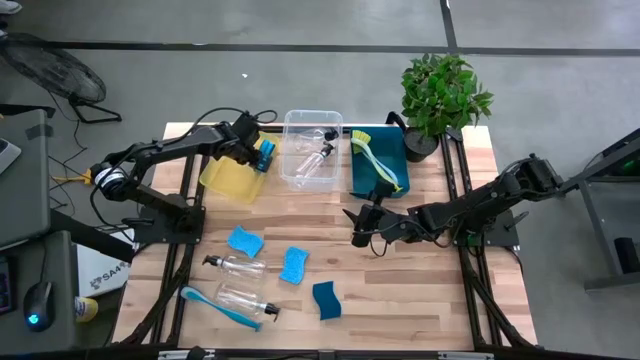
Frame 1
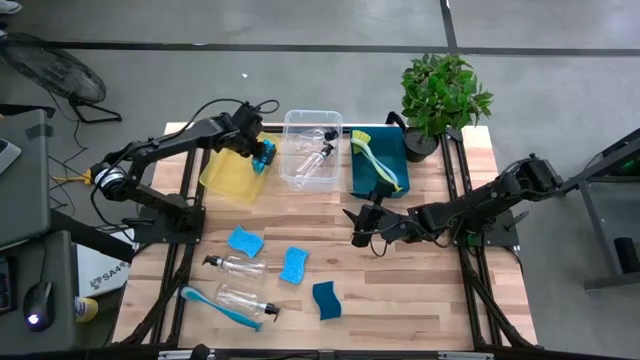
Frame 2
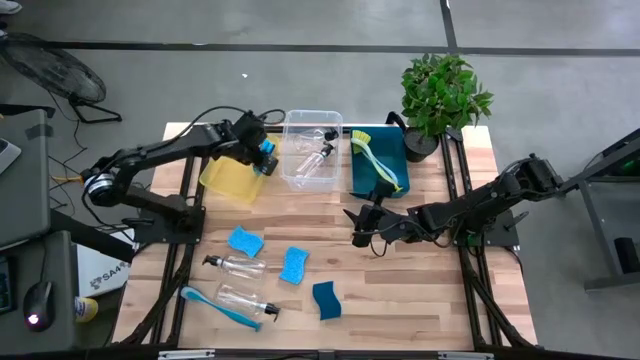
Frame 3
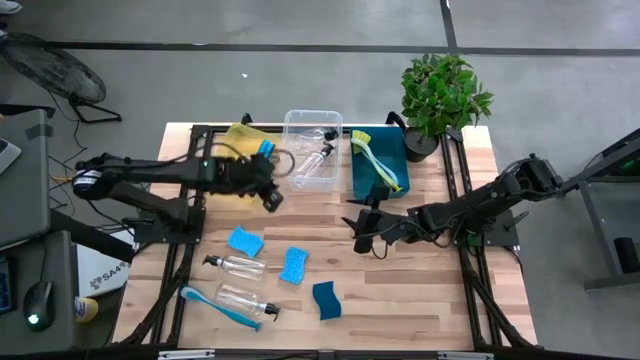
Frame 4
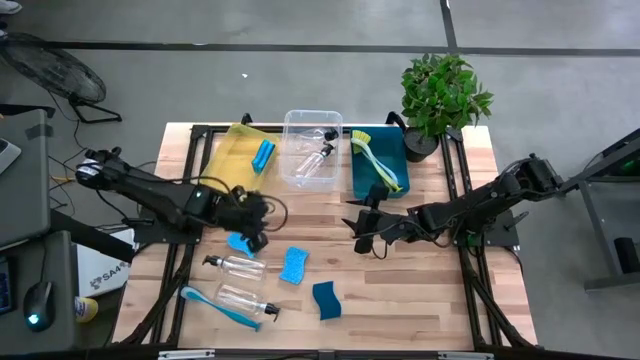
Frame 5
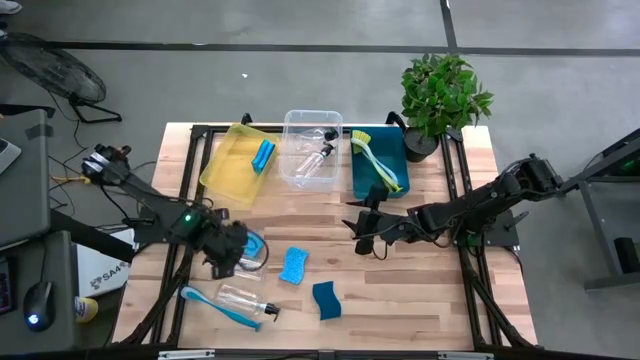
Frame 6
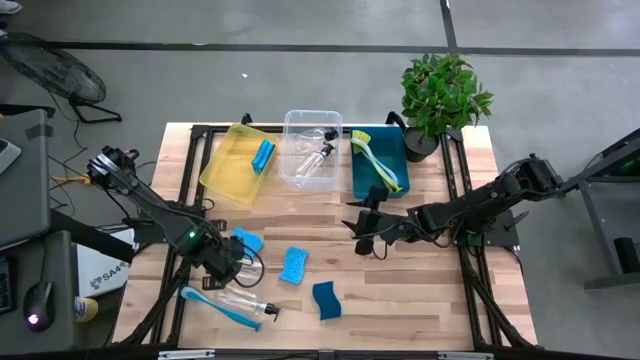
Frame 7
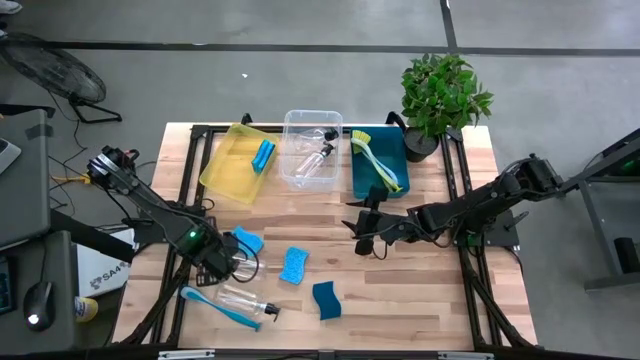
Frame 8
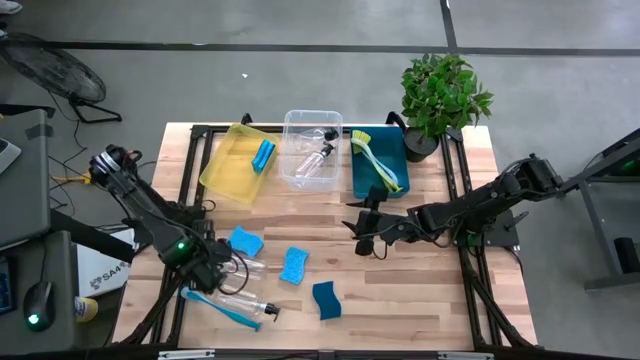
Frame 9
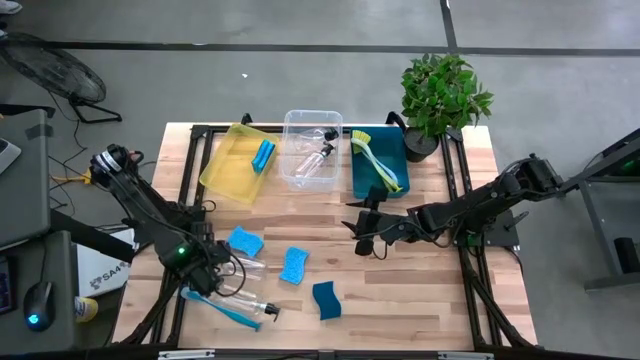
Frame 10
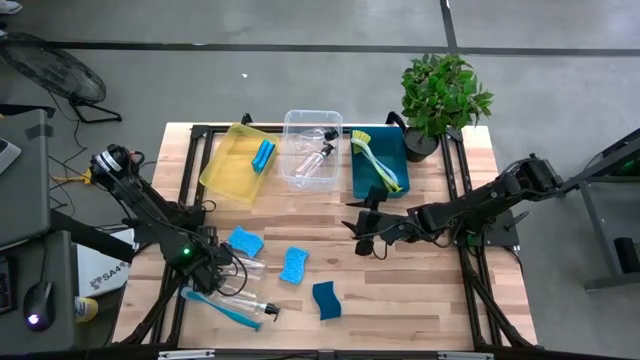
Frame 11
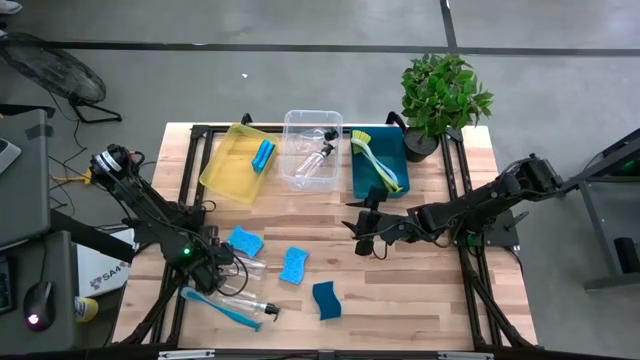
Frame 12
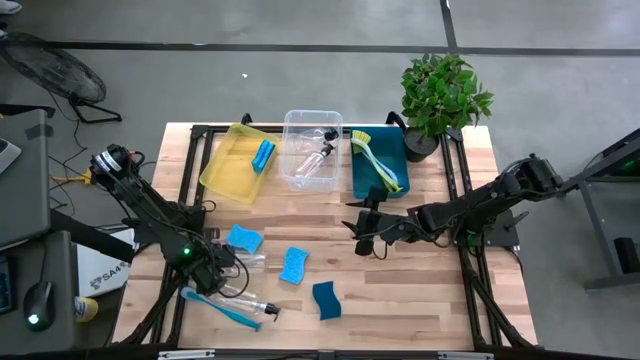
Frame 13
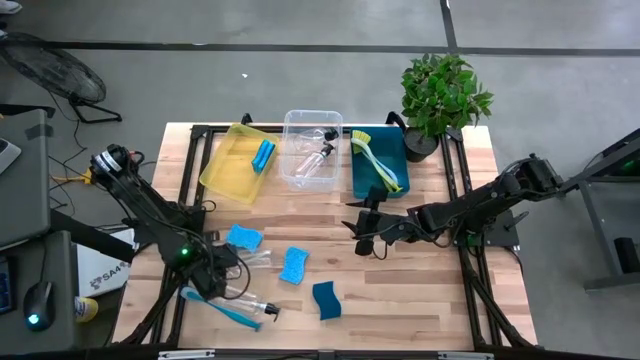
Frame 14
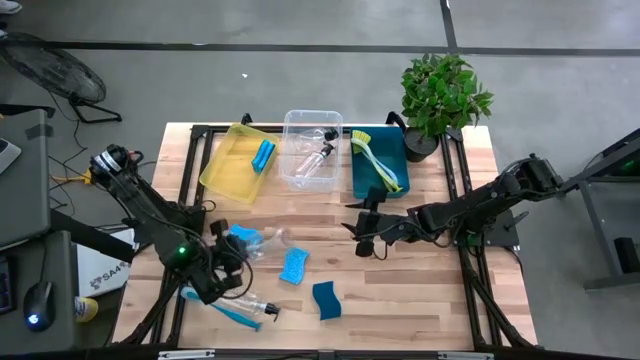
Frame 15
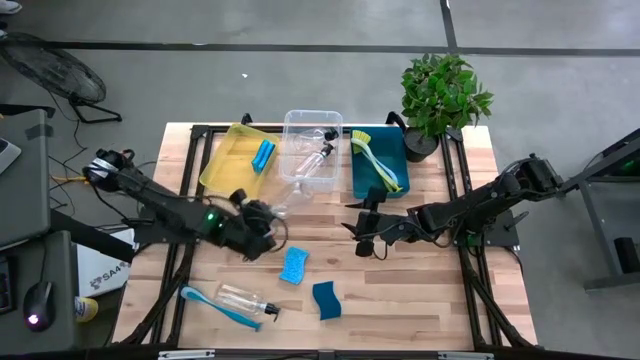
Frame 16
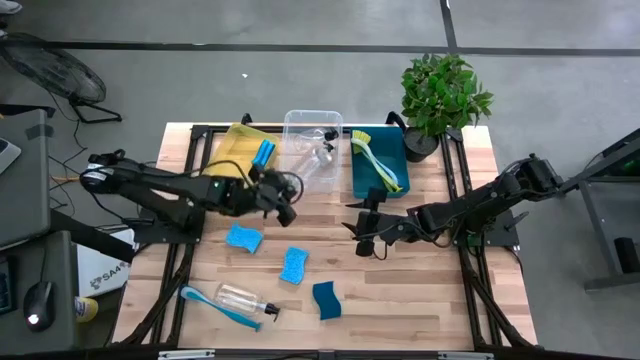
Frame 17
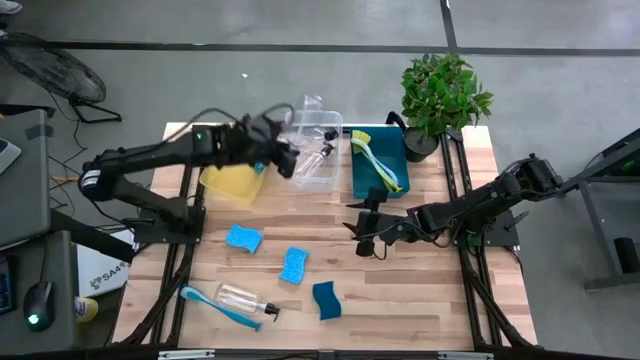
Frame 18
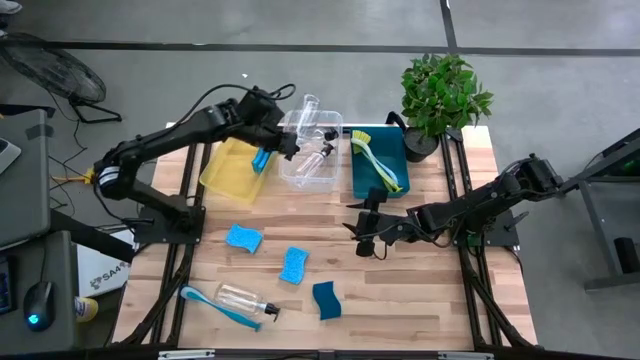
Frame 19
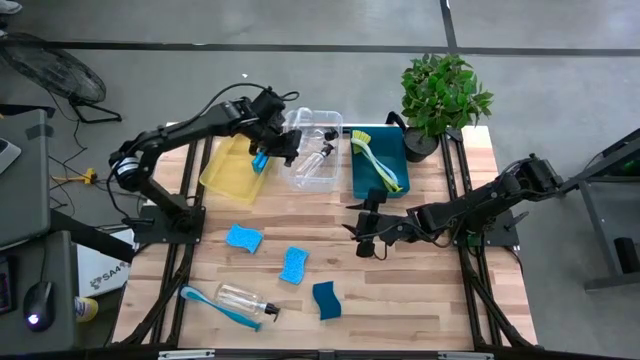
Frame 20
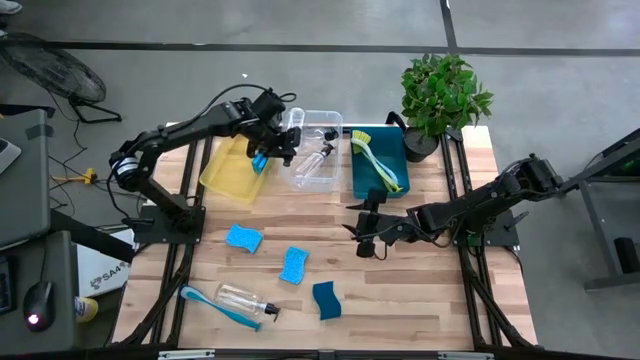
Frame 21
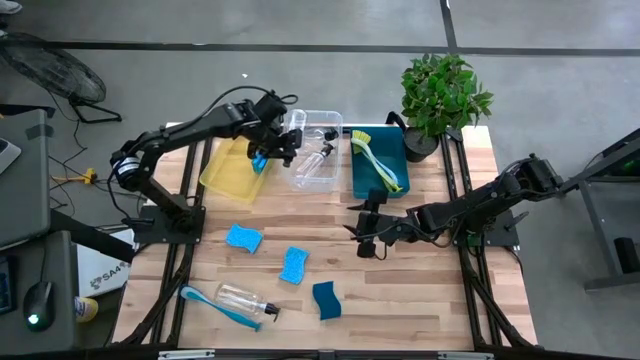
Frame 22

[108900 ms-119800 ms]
Task: Pick & Place Kitchen Sink Supplies
Put the transparent dishwashing bottle into the transparent bin

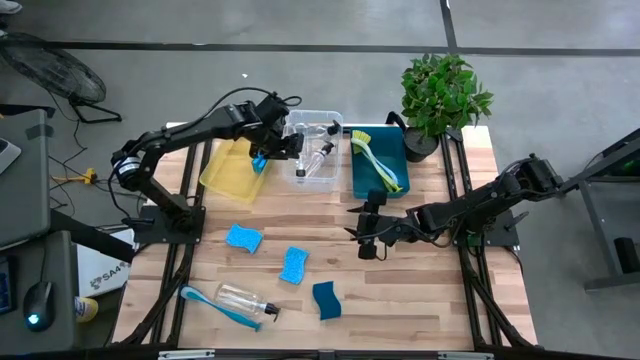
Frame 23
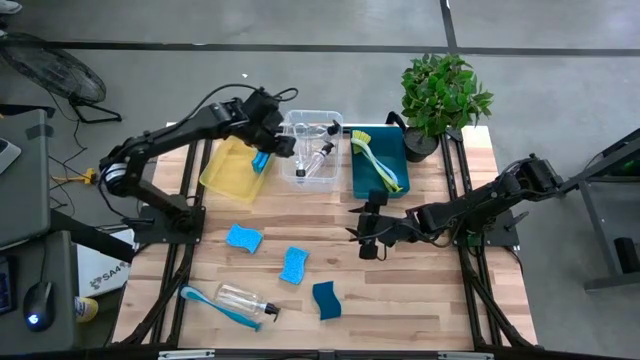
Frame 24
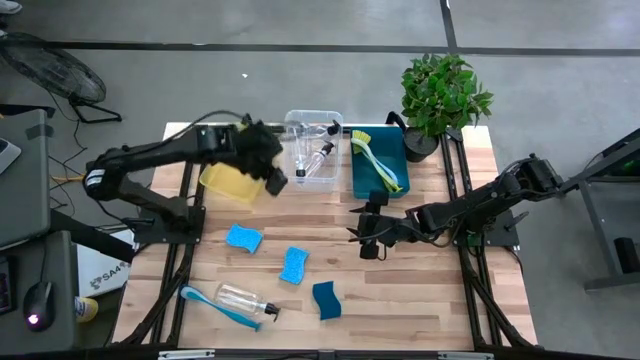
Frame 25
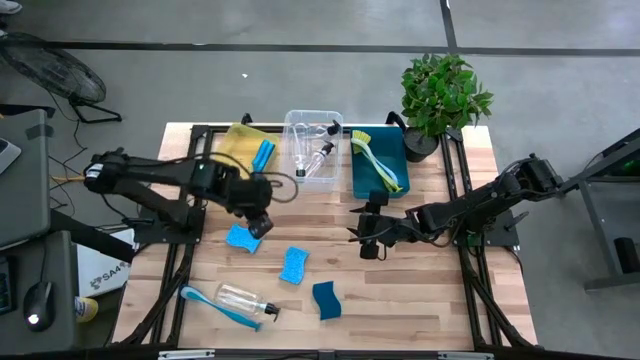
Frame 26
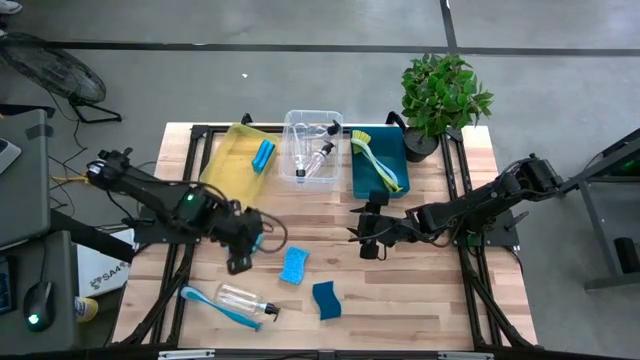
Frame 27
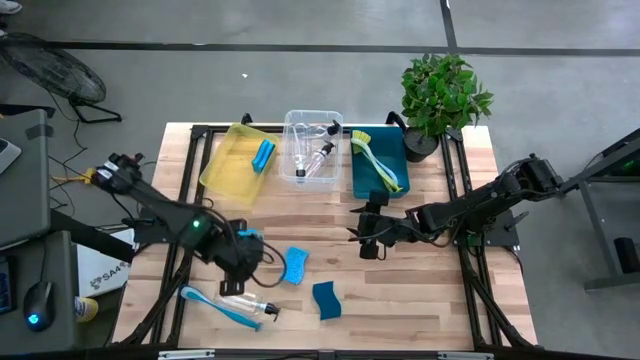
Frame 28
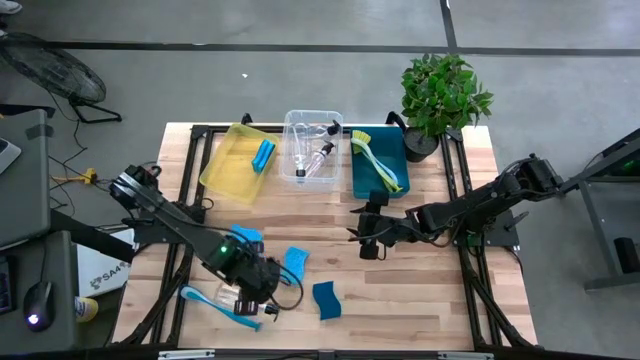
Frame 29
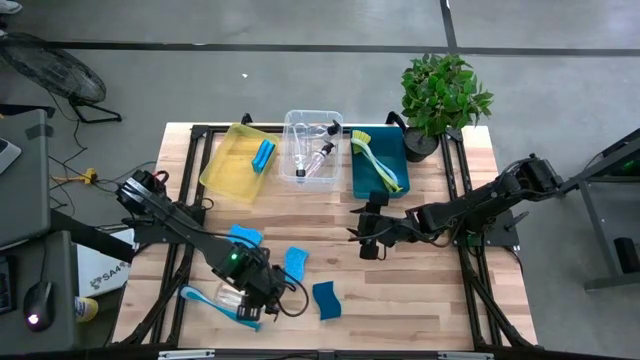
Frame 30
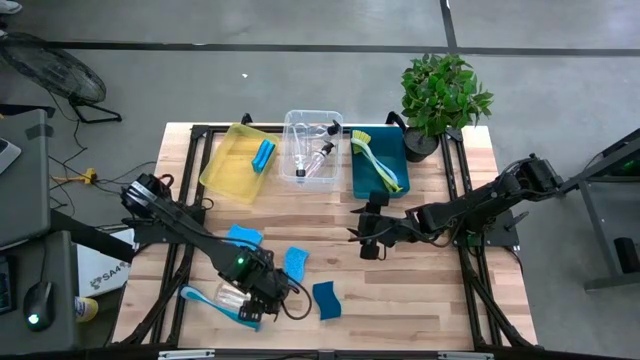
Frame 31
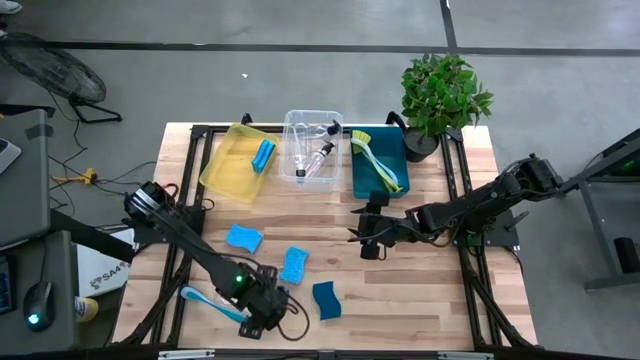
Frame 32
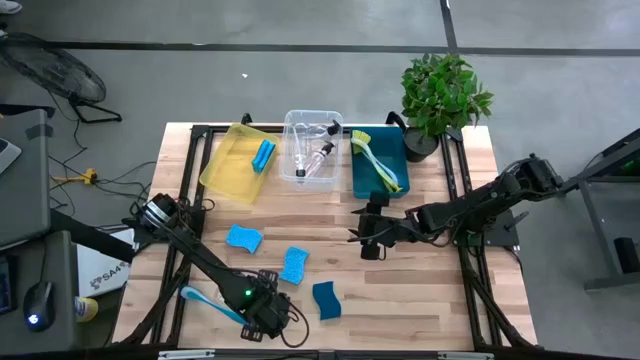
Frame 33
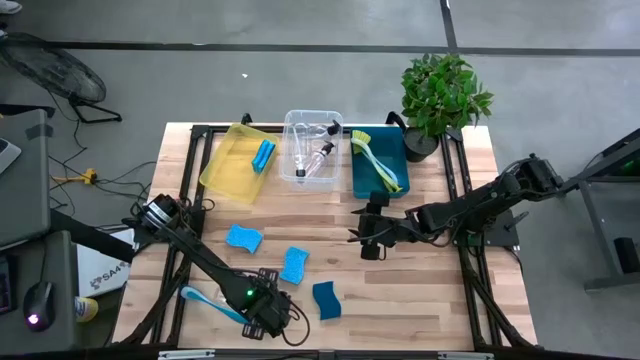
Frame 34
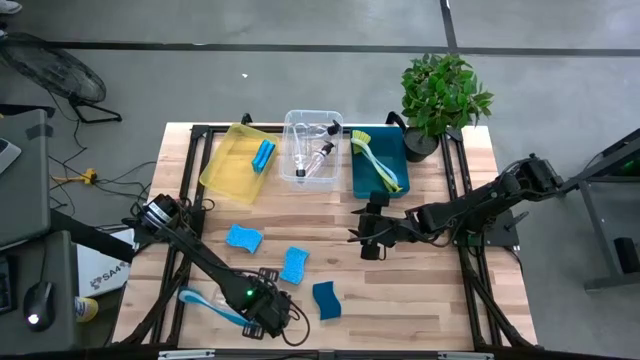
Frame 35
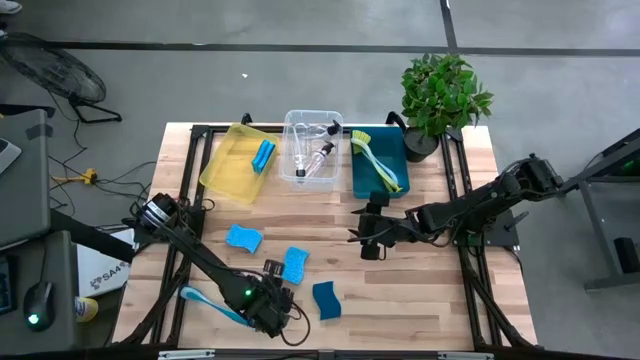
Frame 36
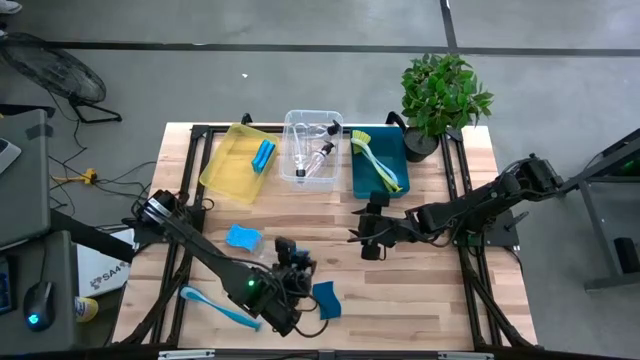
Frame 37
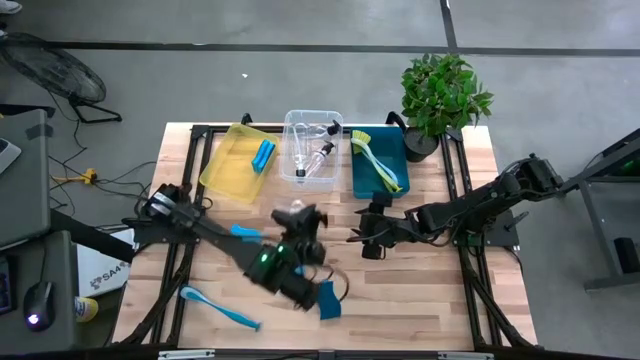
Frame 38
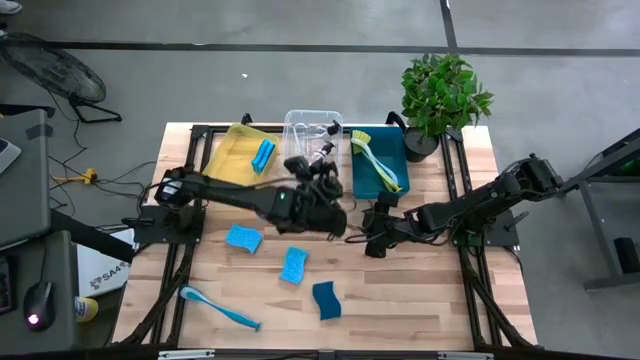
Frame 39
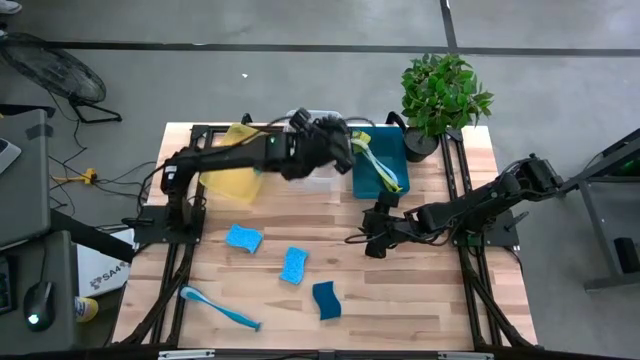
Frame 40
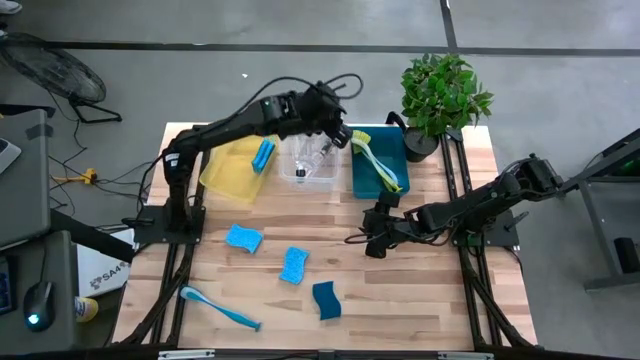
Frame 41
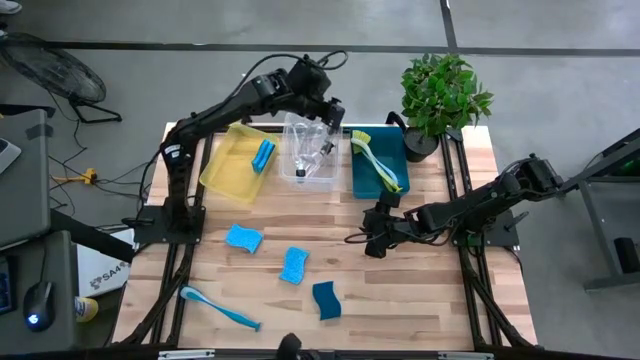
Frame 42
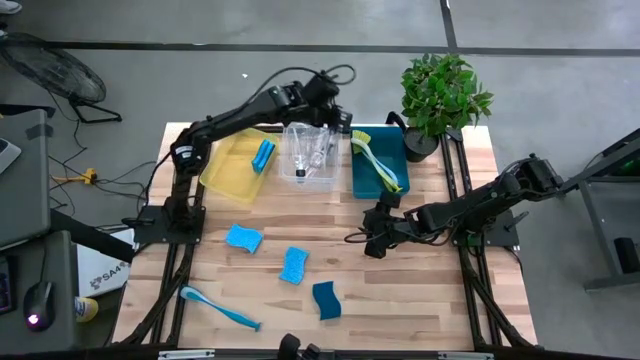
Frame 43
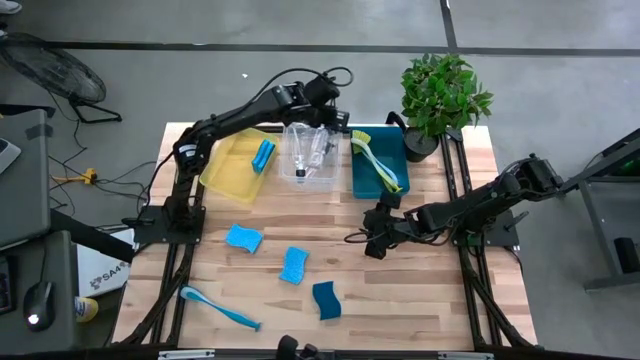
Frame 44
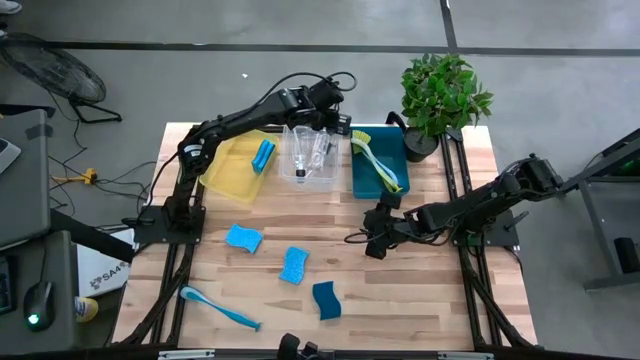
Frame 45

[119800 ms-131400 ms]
Put the transparent dishwashing bottle into the transparent bin
